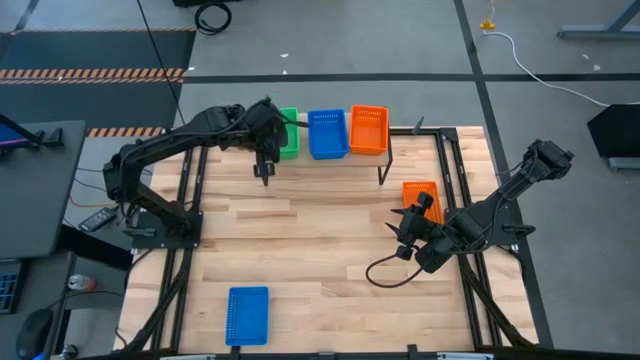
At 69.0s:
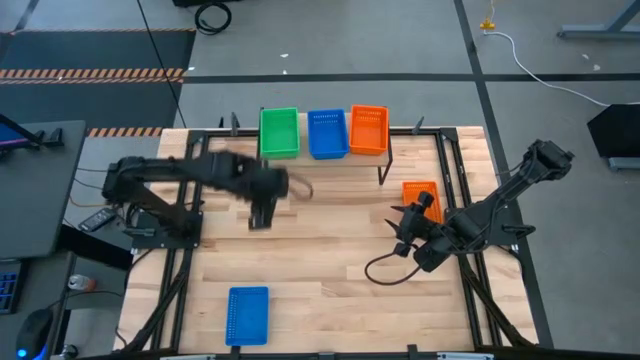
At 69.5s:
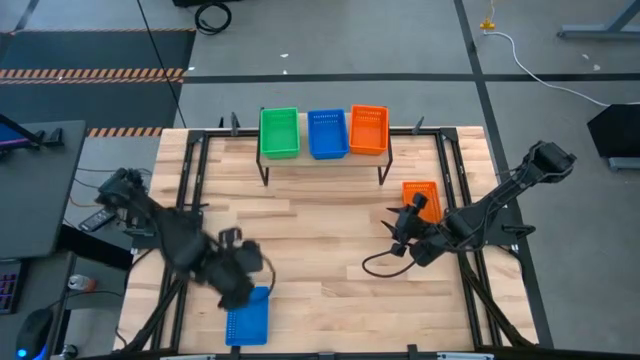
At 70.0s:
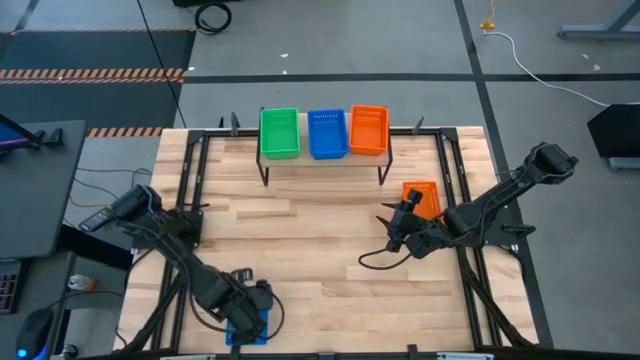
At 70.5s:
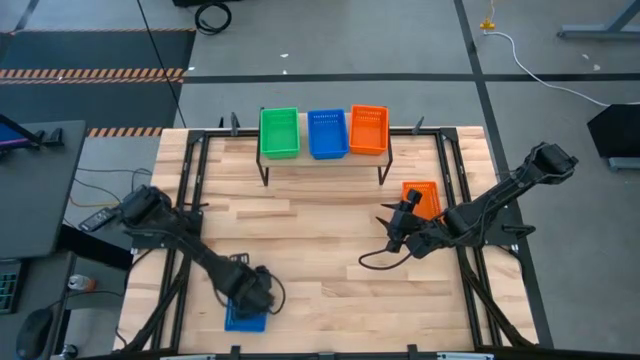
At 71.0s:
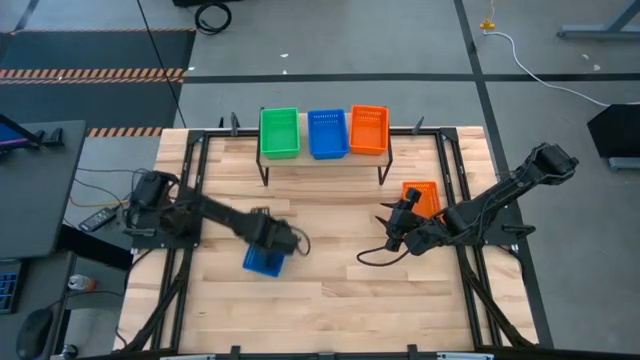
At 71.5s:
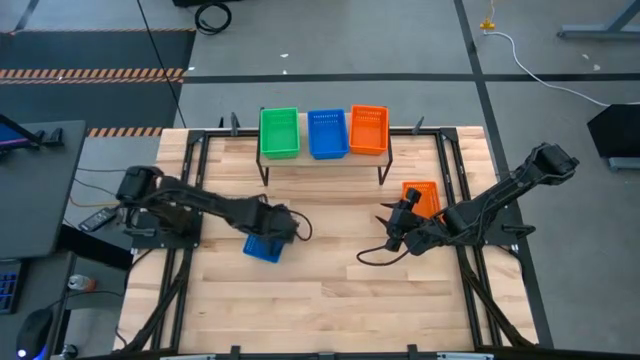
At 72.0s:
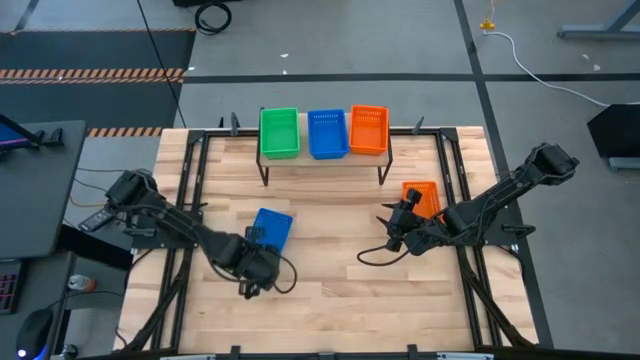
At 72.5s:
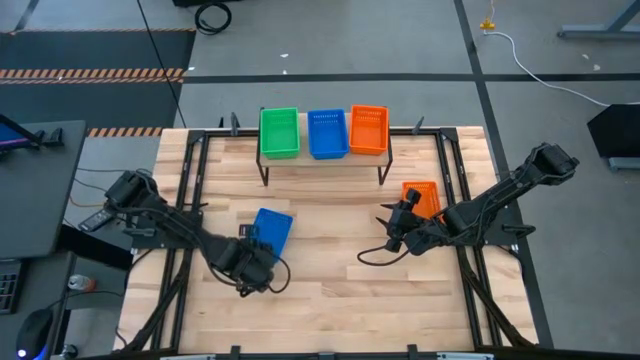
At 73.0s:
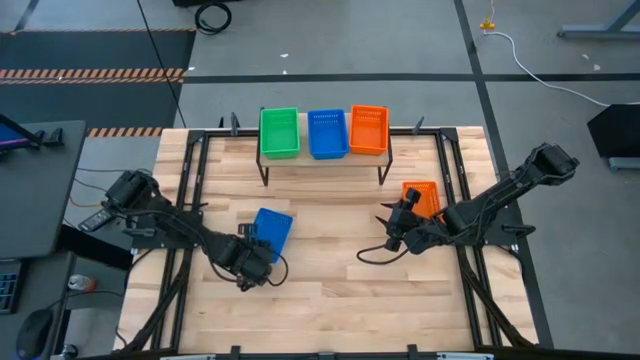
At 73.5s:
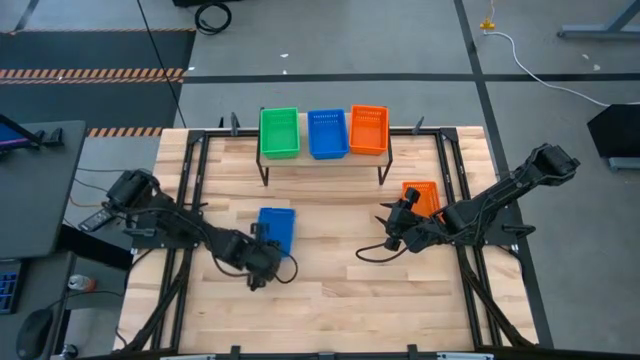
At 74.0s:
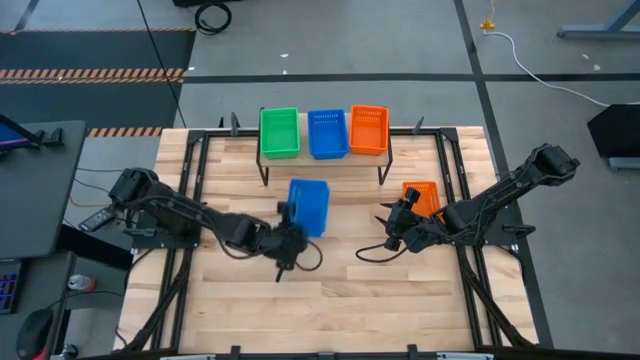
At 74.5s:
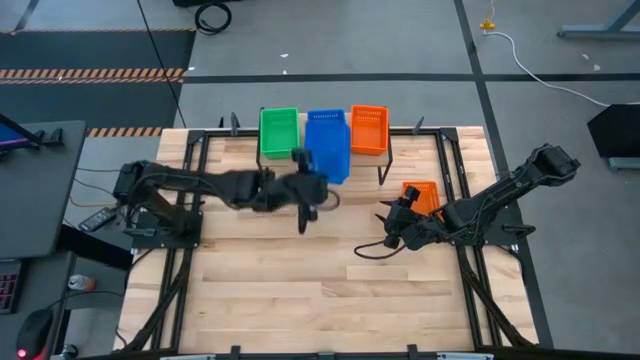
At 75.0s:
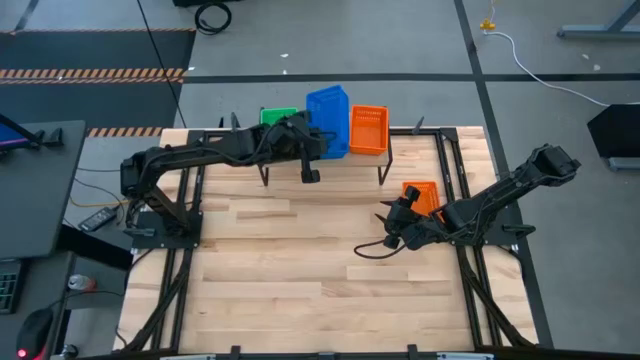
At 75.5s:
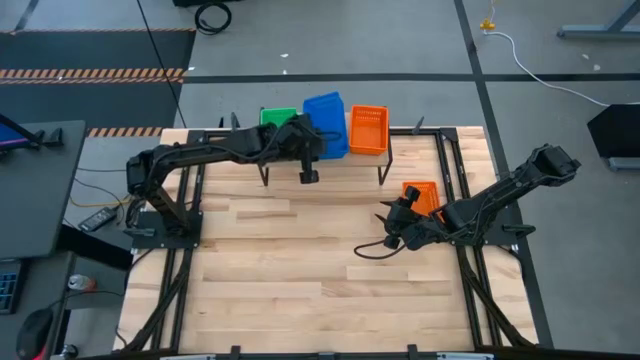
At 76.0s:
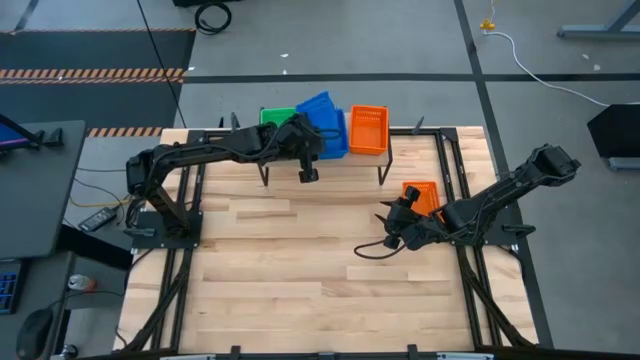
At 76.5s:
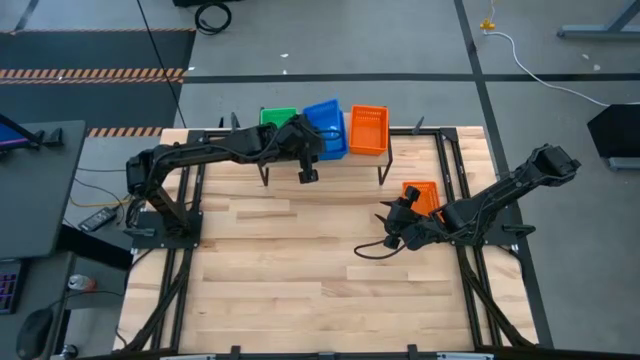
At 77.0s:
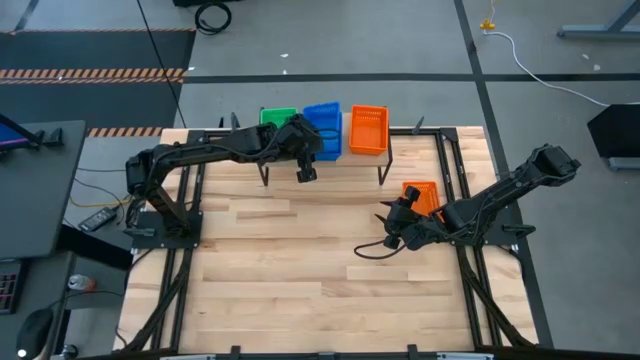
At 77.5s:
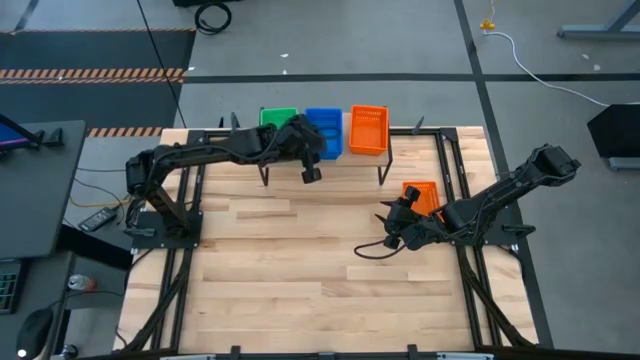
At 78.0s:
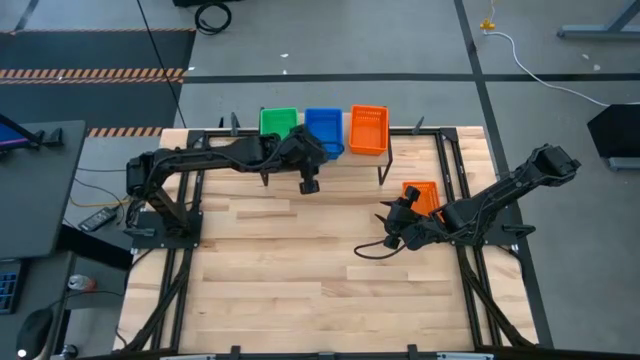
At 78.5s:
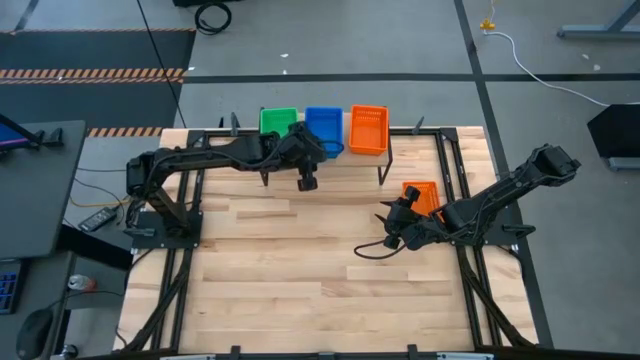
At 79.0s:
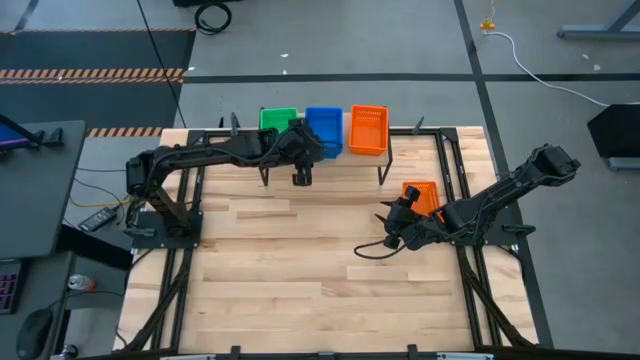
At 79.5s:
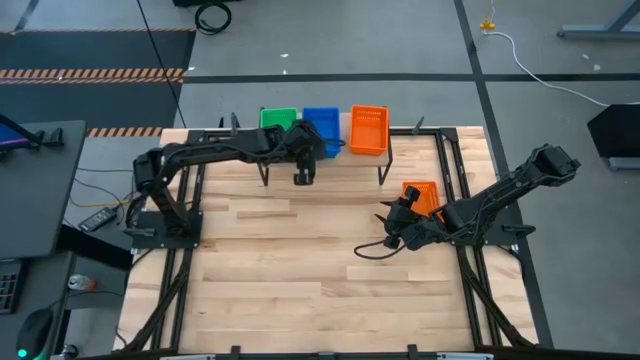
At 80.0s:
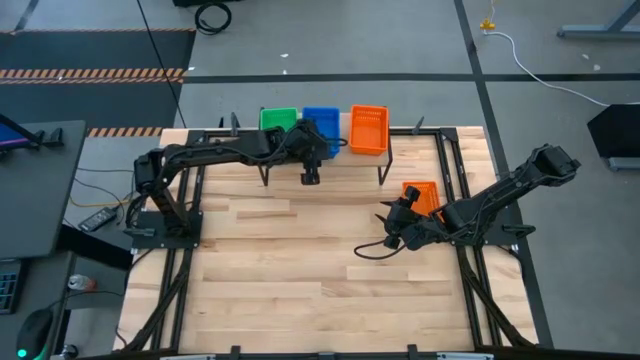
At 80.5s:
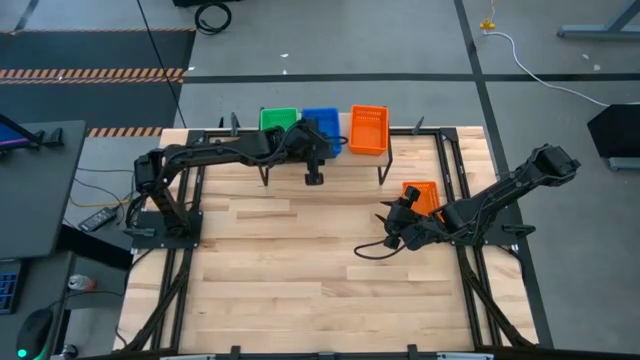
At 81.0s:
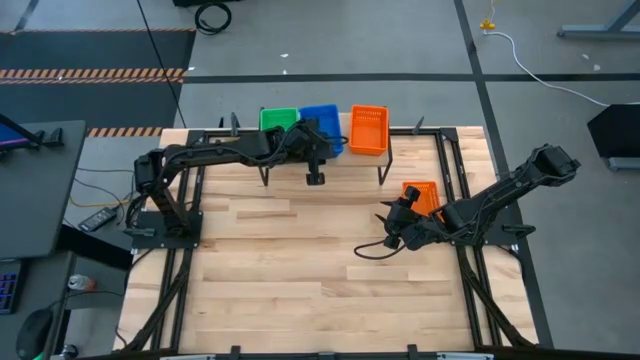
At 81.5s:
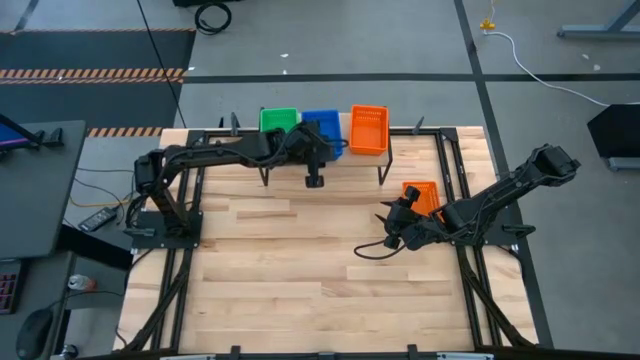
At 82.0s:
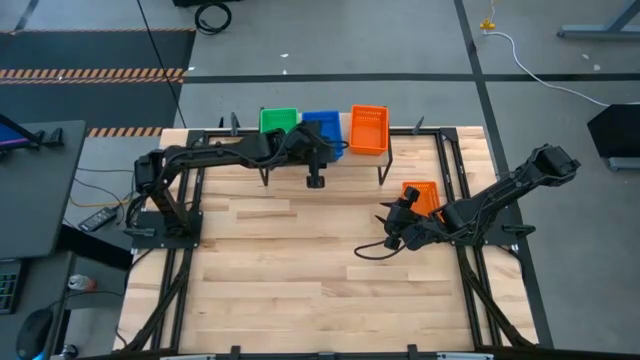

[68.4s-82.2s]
Task: Stack baskets on shelf by color
Stack the blue bin on the blue bin on the shelf

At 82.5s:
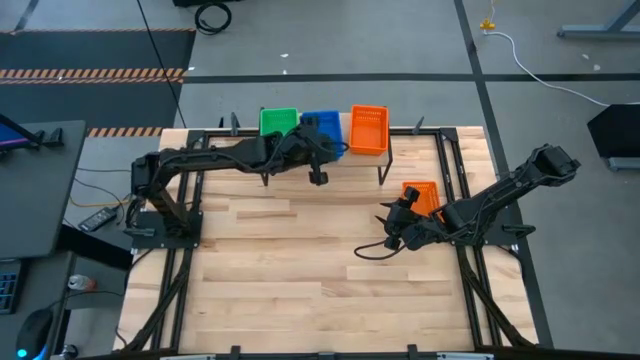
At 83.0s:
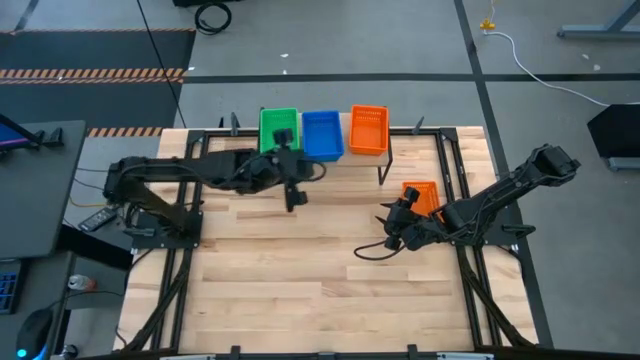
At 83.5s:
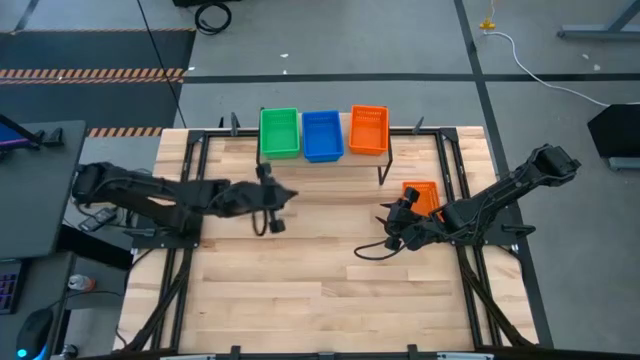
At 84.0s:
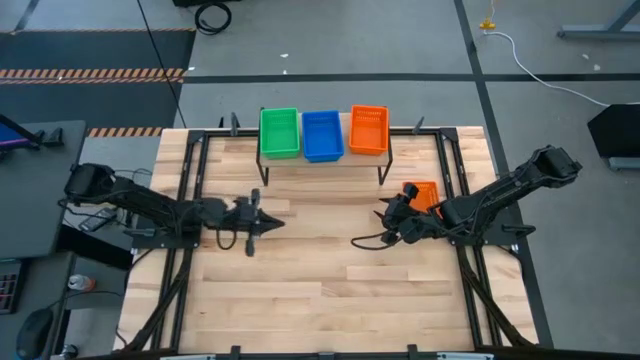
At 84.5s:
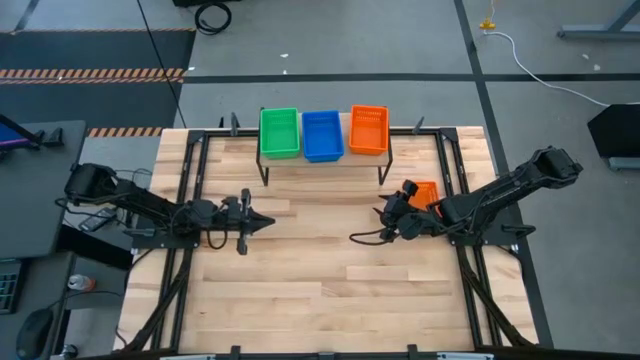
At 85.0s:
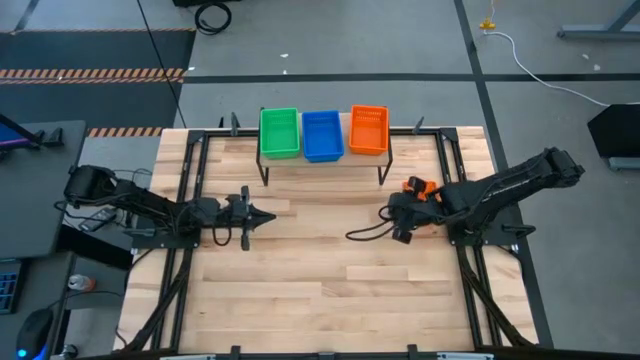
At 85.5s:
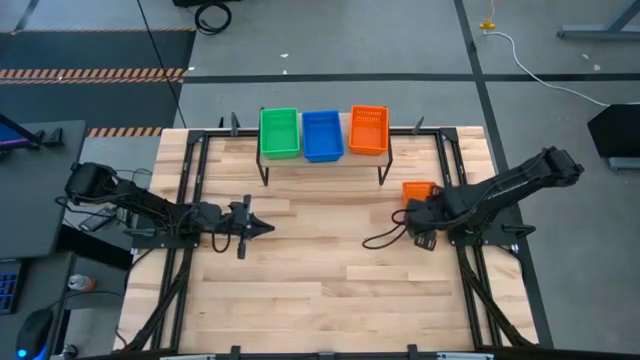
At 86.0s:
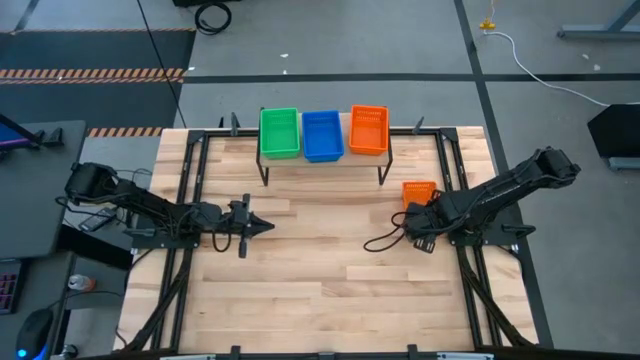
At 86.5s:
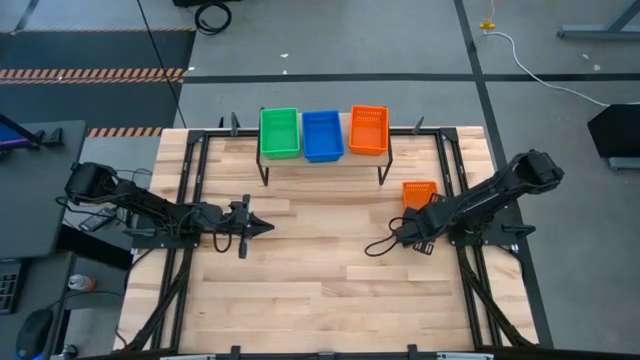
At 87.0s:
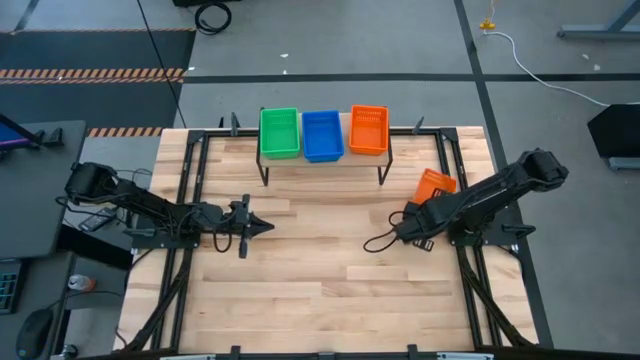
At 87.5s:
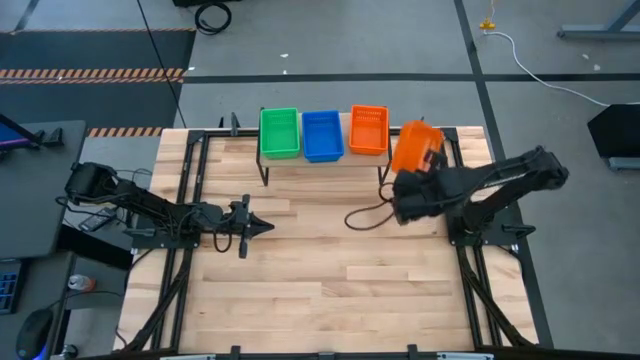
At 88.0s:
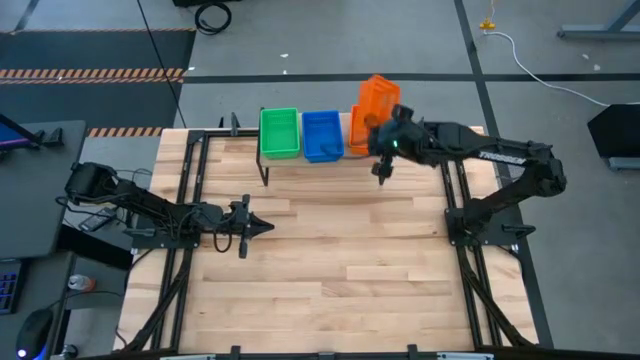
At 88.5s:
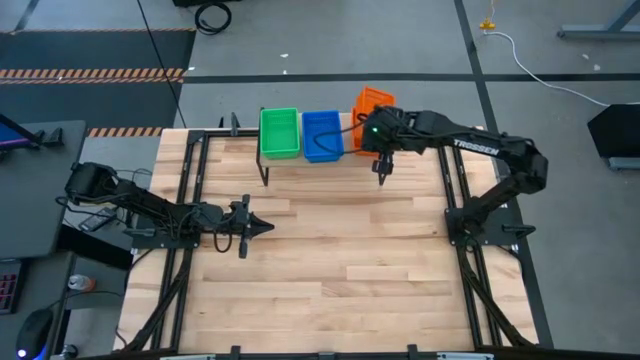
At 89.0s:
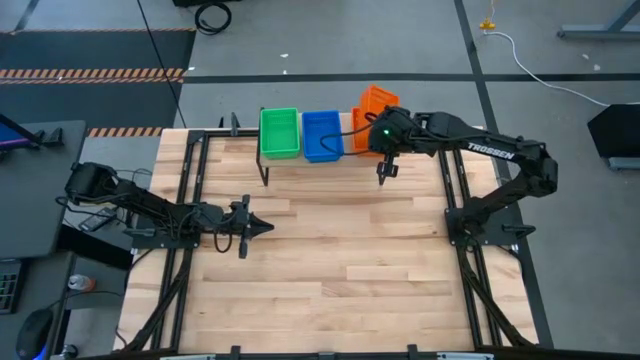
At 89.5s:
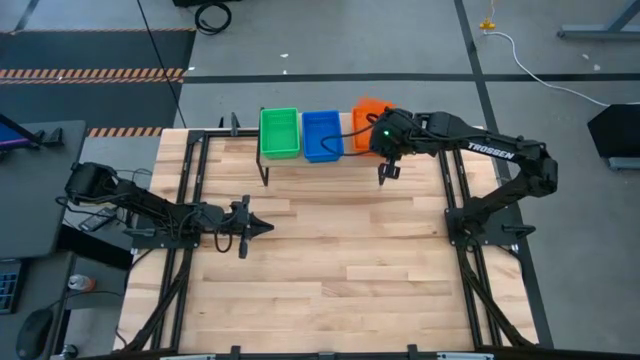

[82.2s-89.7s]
Stack the orange bin on the orange bin on the shelf

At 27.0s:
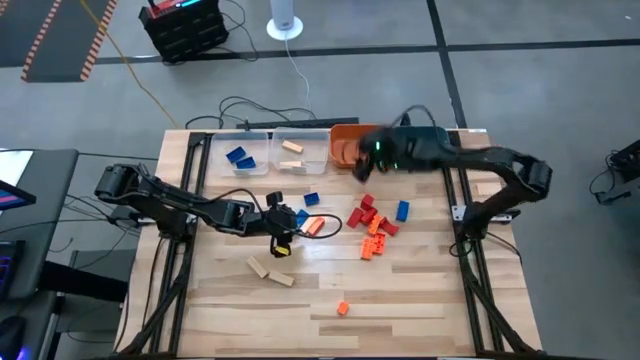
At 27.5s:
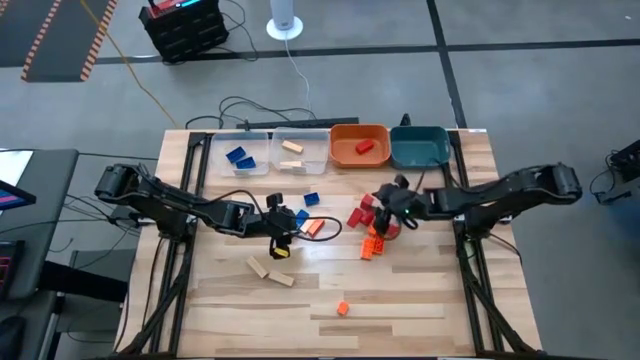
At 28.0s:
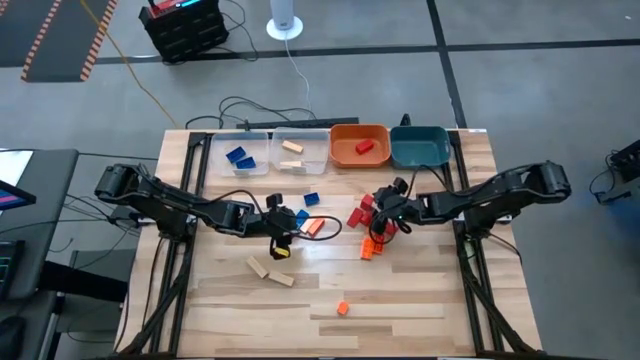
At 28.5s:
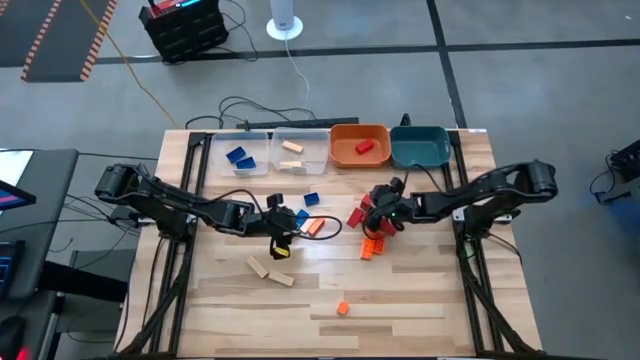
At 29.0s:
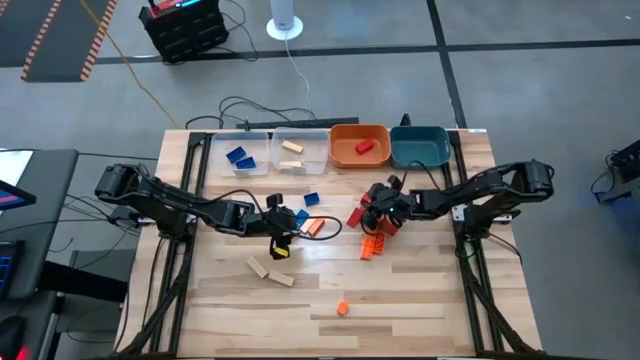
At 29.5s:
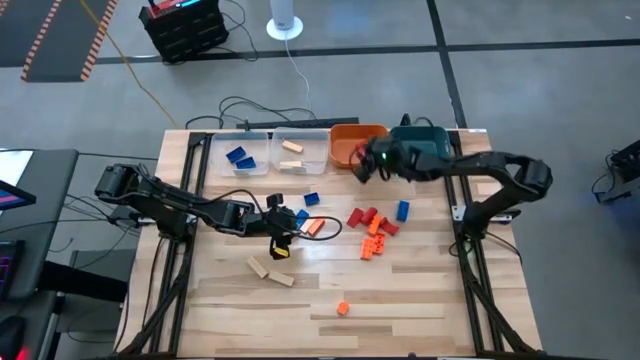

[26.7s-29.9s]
Task: Sort blocks
Put the red block into the orange bin
